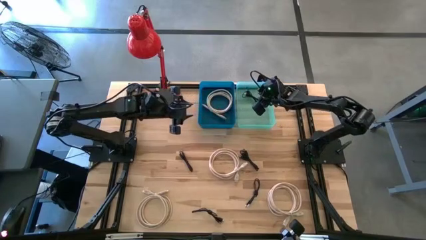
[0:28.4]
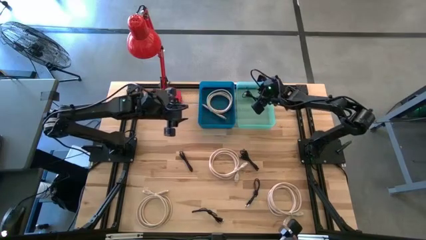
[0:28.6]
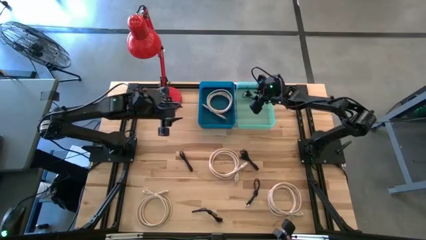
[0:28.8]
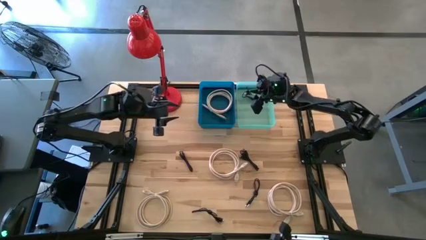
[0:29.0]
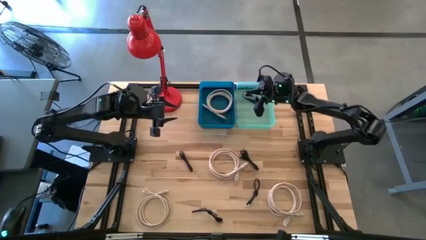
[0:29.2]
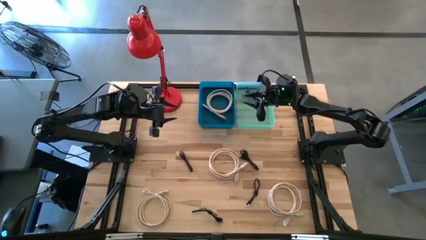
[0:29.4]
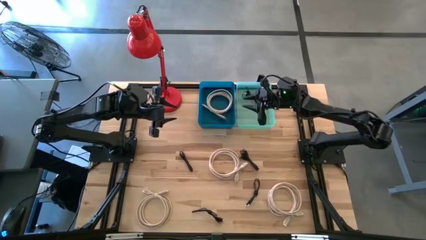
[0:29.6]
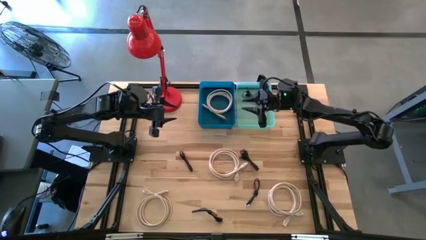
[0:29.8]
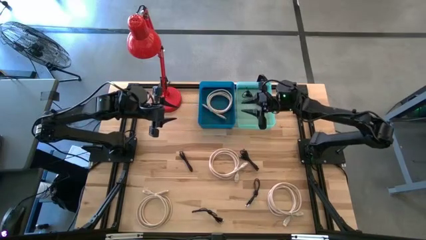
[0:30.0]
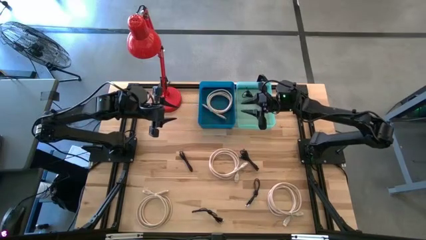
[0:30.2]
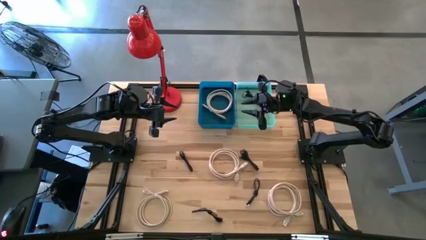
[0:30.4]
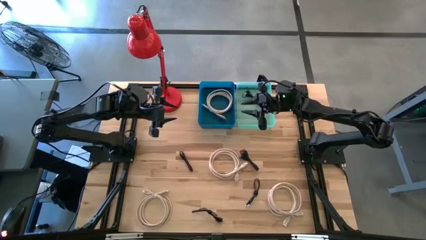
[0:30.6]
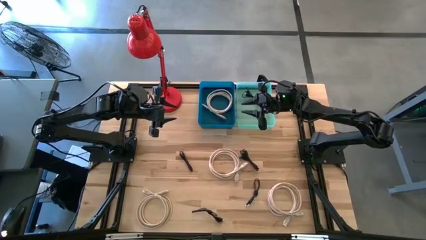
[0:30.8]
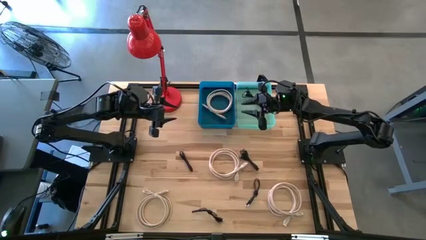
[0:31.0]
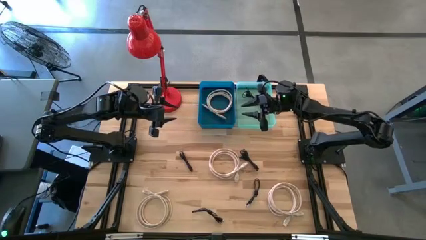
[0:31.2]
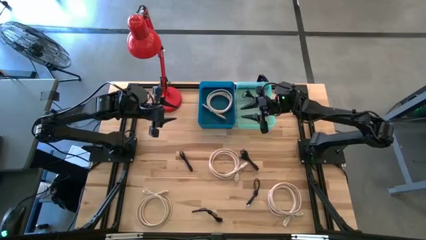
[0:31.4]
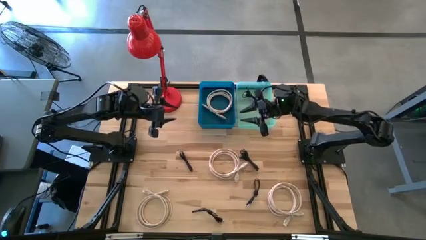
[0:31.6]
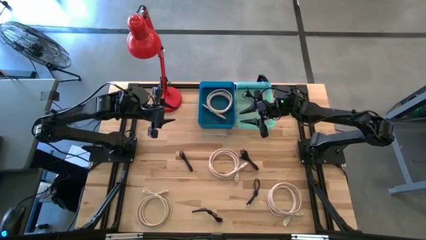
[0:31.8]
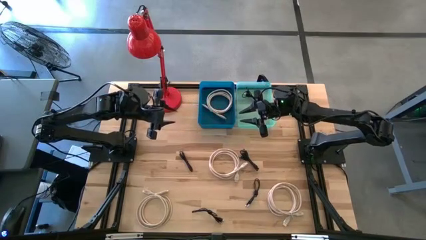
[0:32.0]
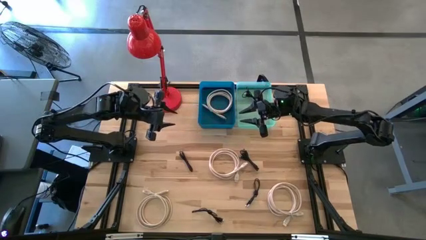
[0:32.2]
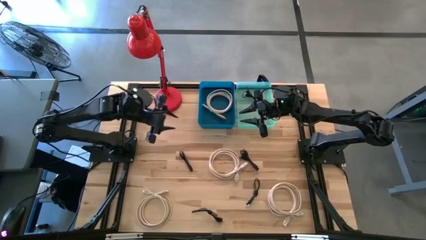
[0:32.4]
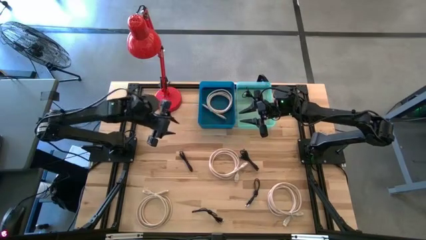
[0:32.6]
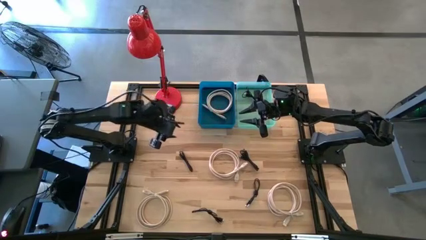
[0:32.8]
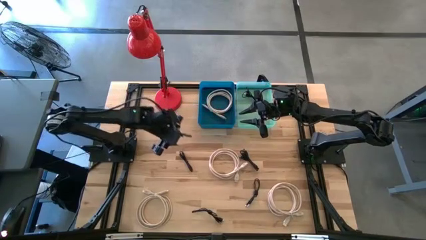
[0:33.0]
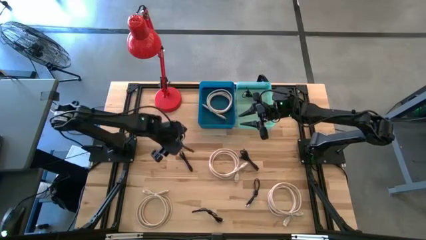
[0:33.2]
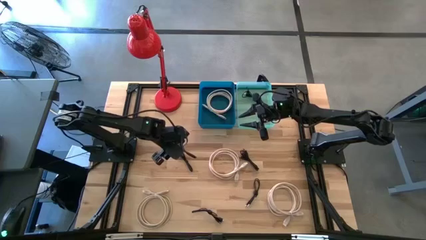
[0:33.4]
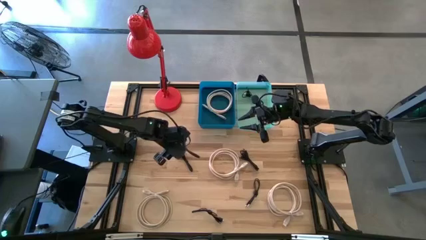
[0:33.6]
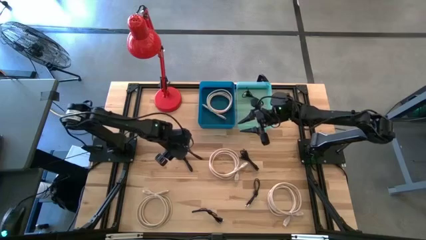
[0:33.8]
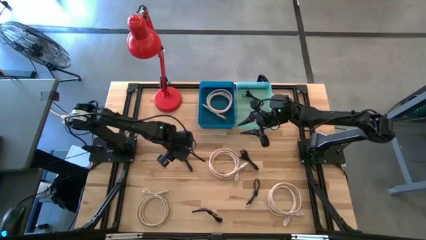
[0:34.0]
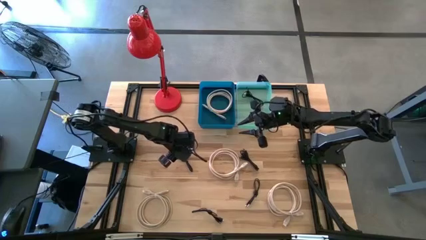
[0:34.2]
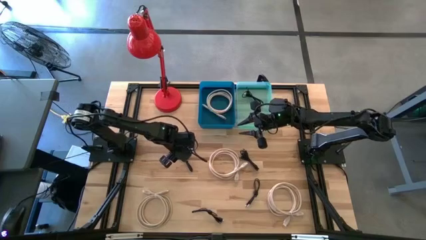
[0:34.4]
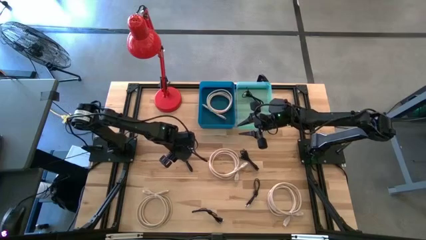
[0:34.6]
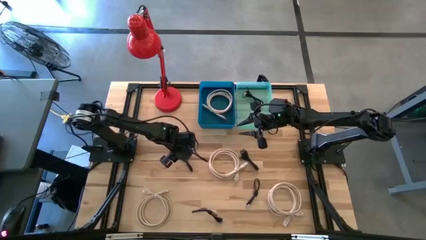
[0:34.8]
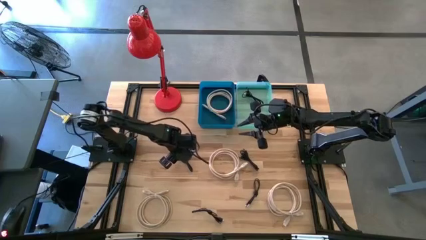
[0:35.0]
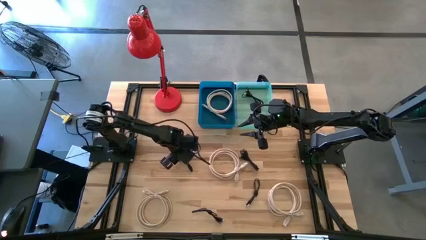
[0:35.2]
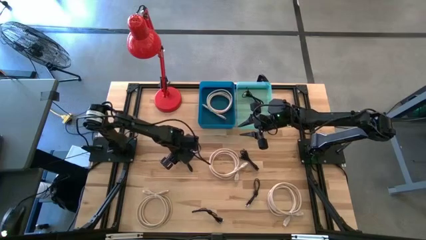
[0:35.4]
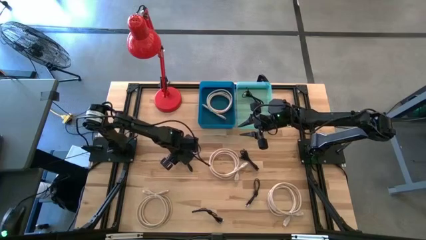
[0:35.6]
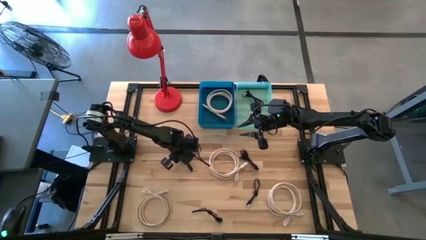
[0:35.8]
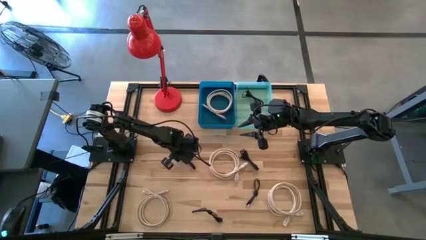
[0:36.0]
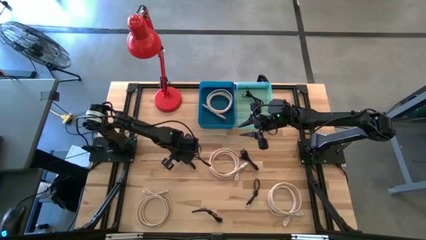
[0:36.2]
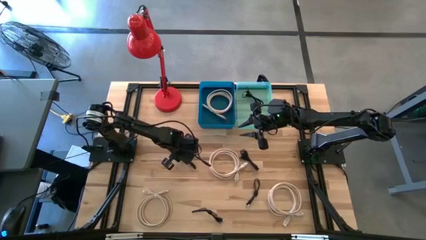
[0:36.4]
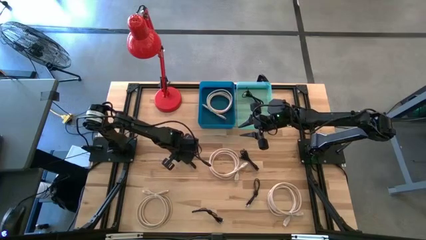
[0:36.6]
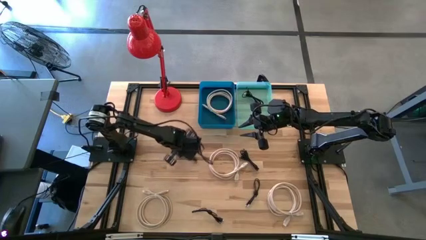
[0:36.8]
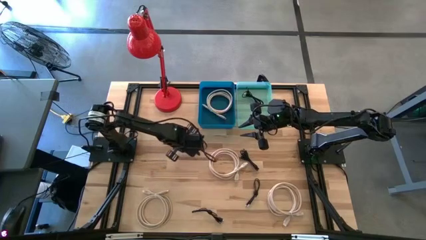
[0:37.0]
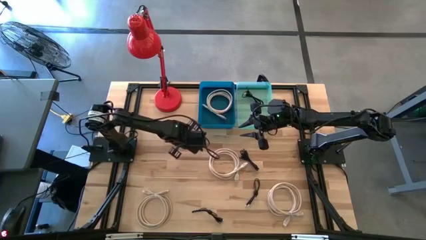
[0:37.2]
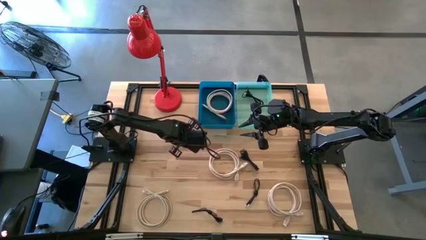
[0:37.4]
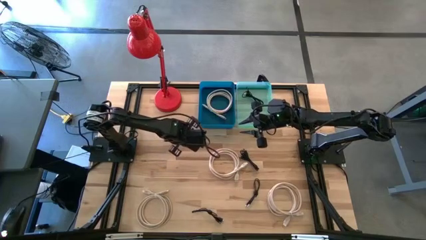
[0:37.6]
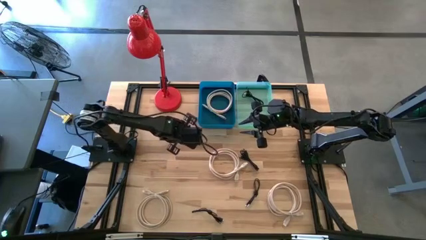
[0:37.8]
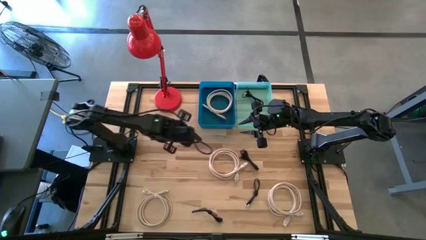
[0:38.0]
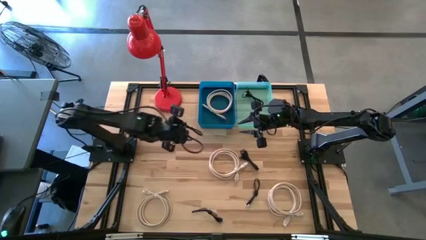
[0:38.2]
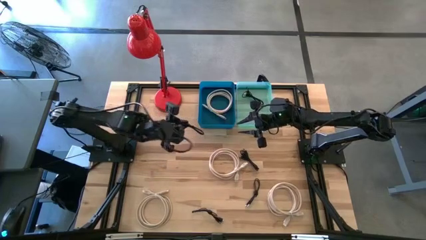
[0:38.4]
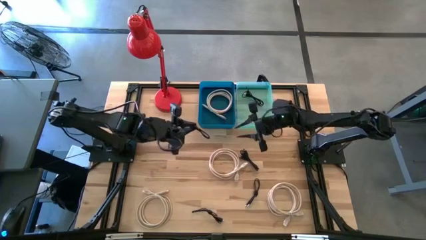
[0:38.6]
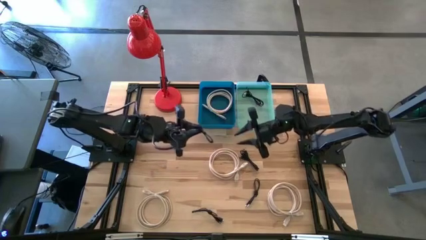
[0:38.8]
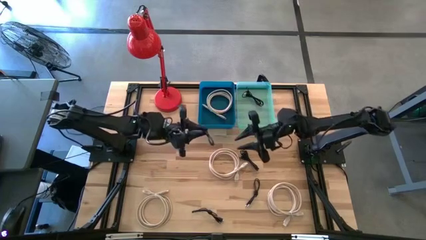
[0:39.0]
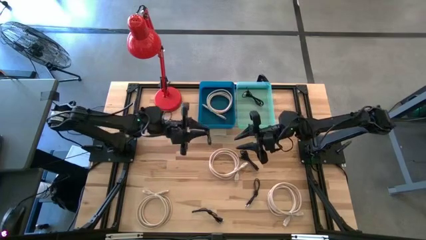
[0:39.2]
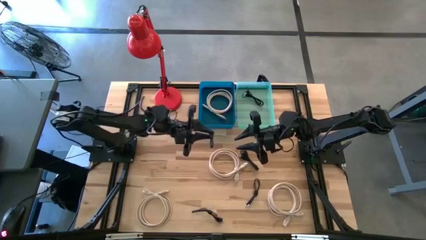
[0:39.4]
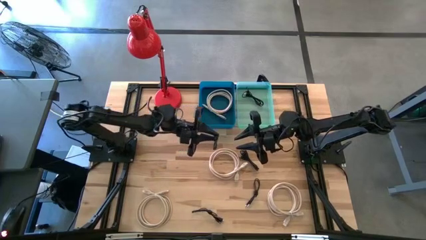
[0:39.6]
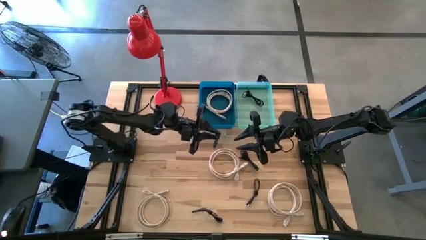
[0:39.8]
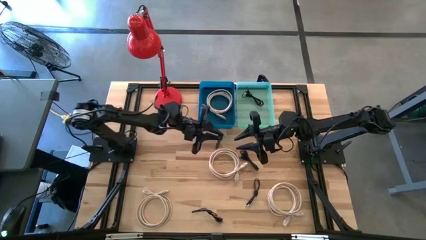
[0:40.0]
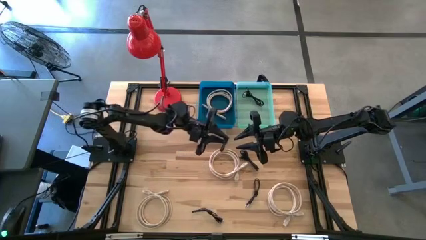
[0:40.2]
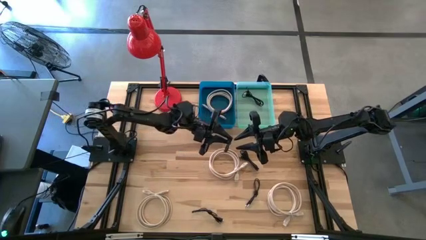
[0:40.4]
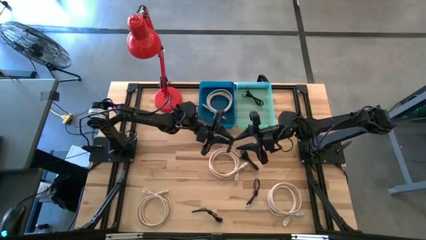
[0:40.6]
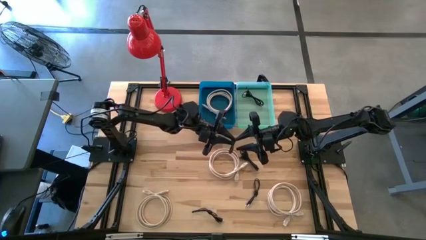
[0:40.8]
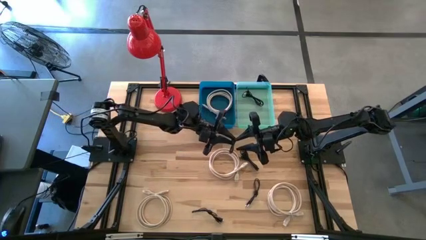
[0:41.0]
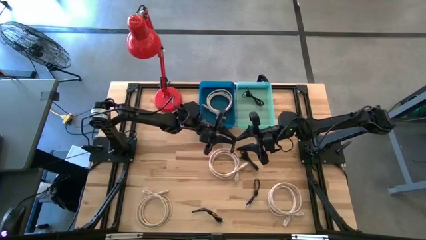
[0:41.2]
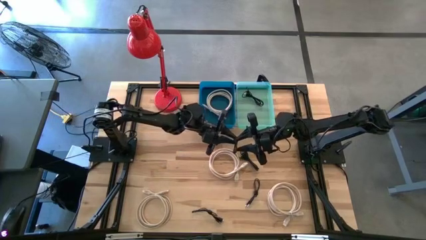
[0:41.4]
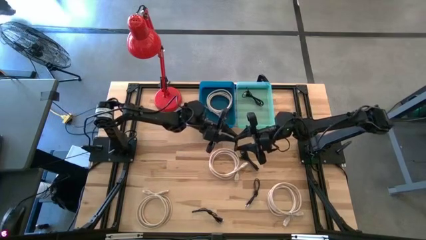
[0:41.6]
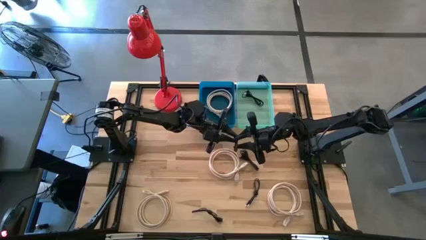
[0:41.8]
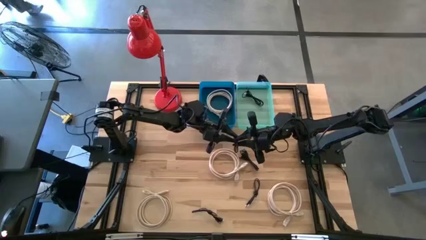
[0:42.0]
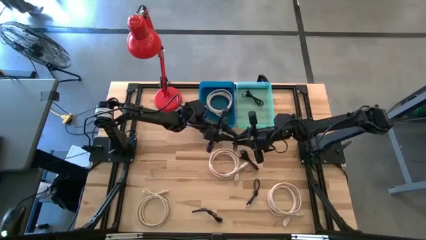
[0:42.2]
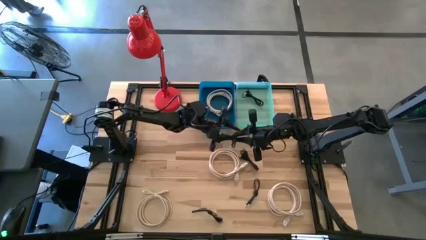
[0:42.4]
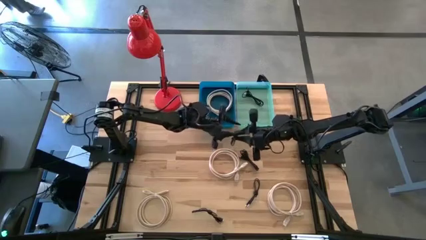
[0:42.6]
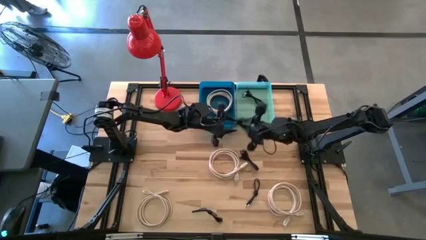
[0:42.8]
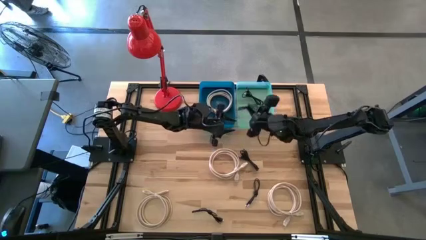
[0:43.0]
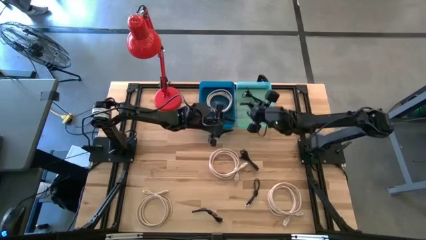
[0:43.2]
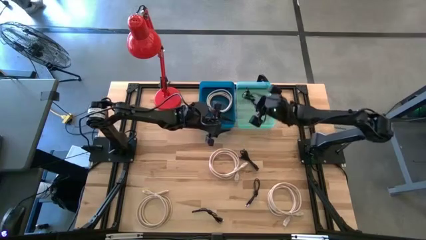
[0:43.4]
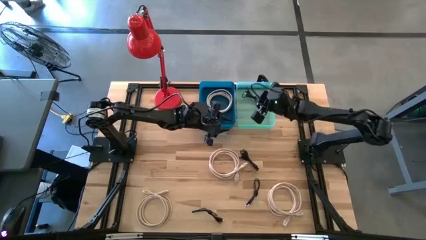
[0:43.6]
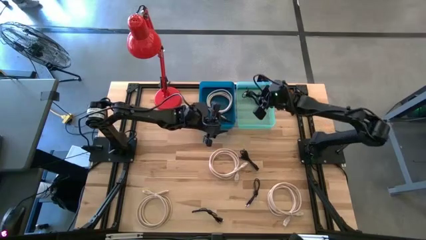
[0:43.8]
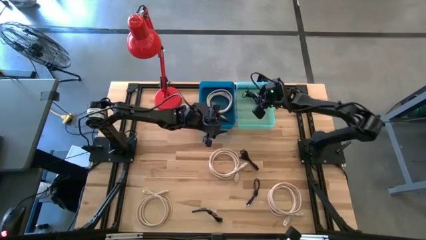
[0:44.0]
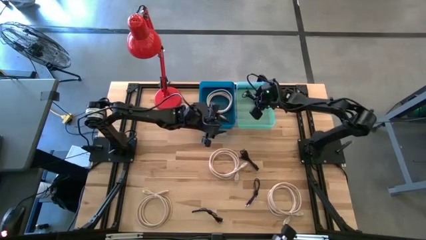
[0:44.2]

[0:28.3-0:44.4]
Task: Pick & Place USB Port
Put the black charger cable into the green bin
